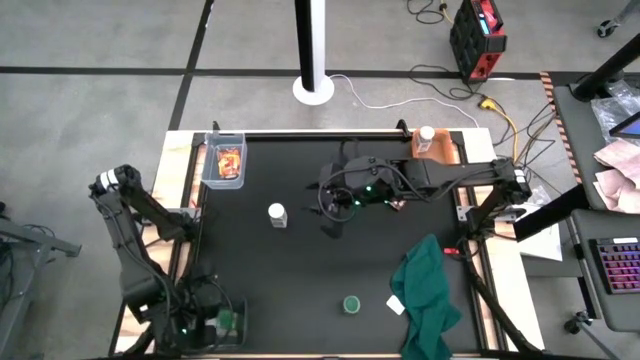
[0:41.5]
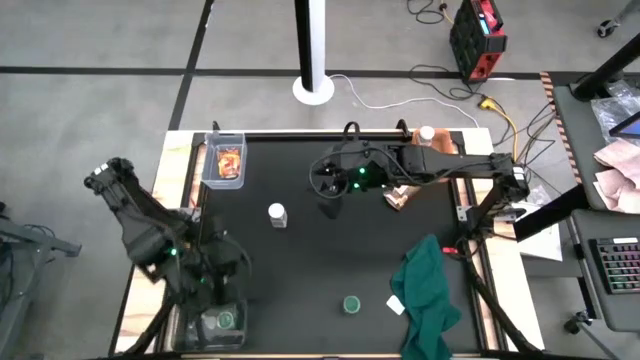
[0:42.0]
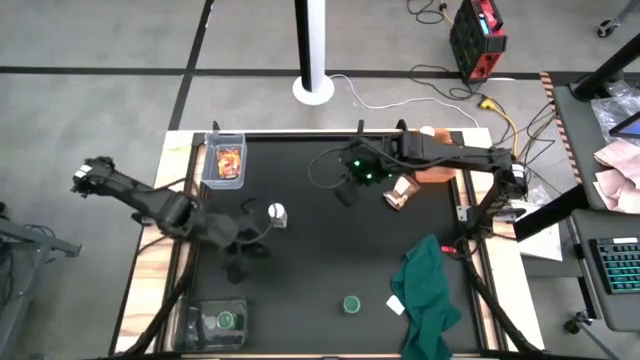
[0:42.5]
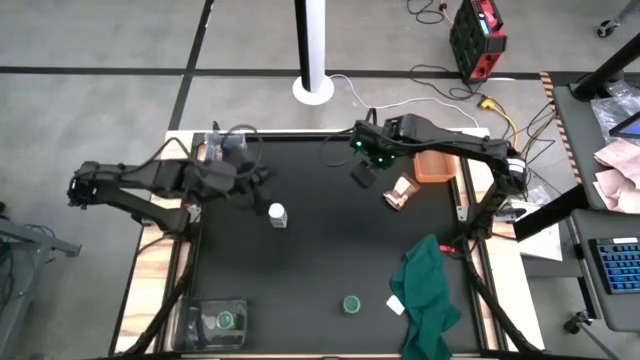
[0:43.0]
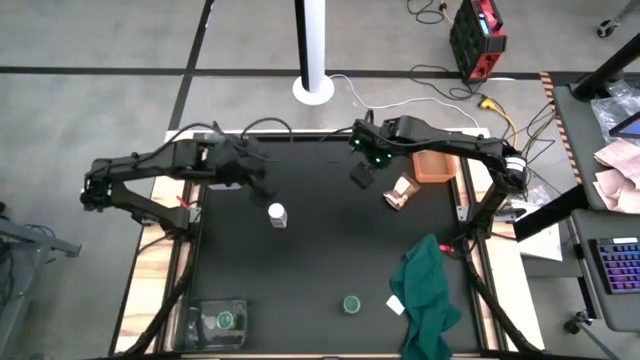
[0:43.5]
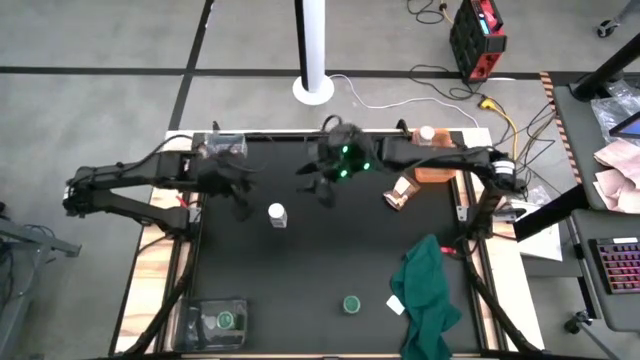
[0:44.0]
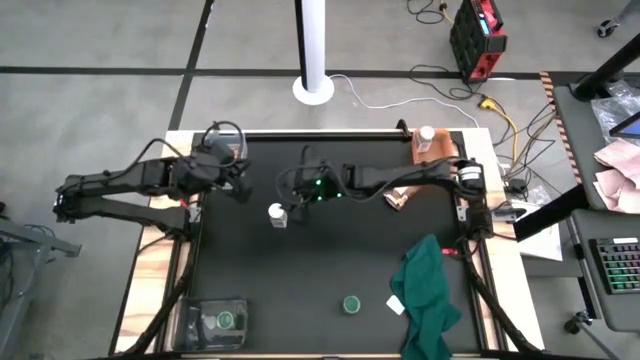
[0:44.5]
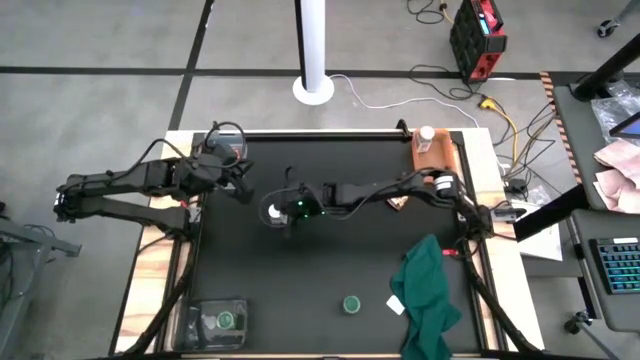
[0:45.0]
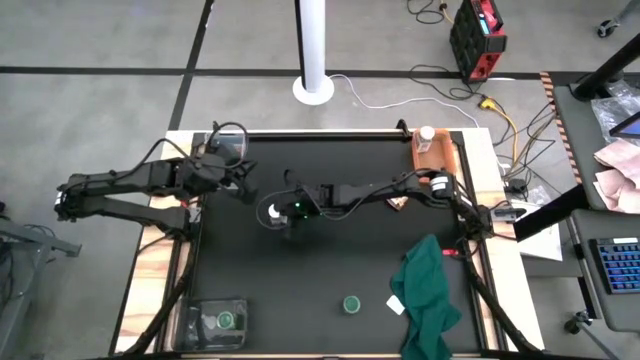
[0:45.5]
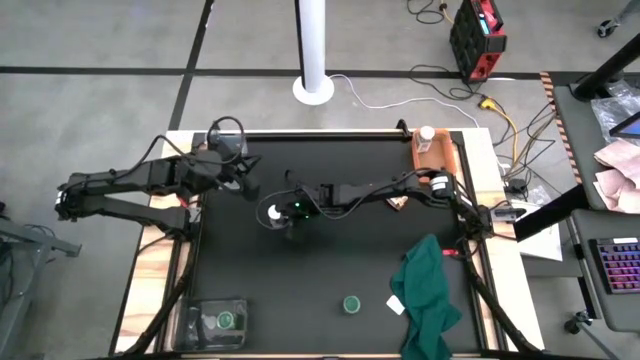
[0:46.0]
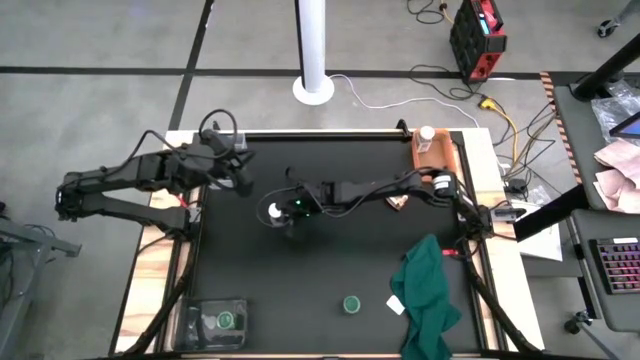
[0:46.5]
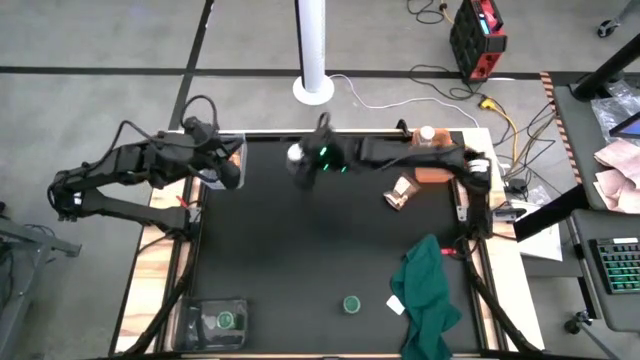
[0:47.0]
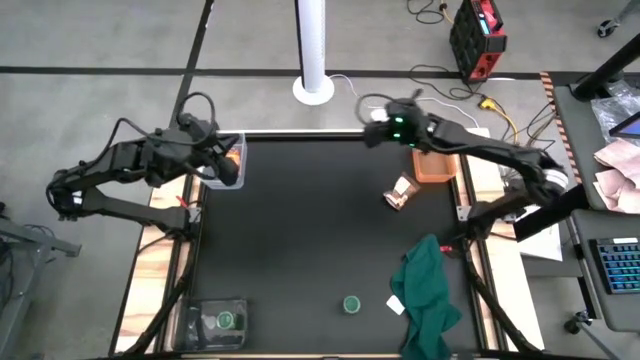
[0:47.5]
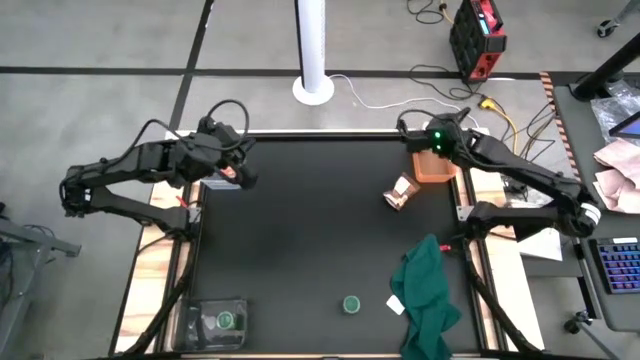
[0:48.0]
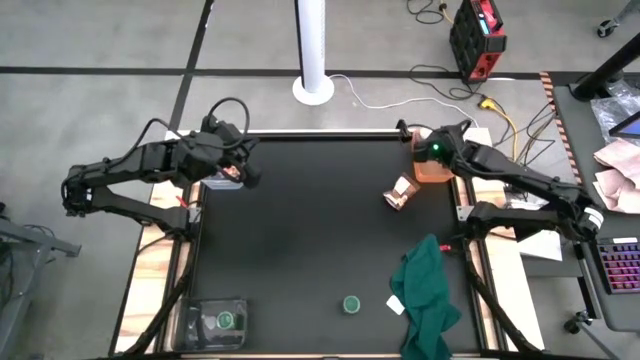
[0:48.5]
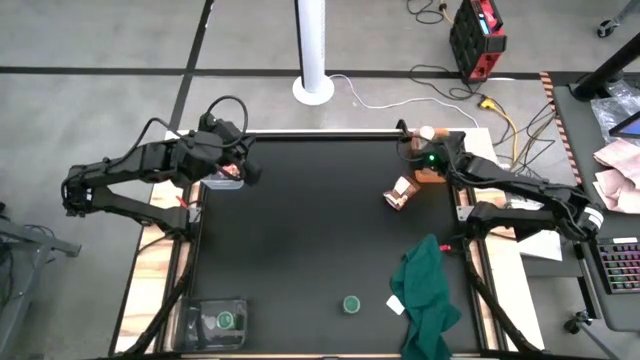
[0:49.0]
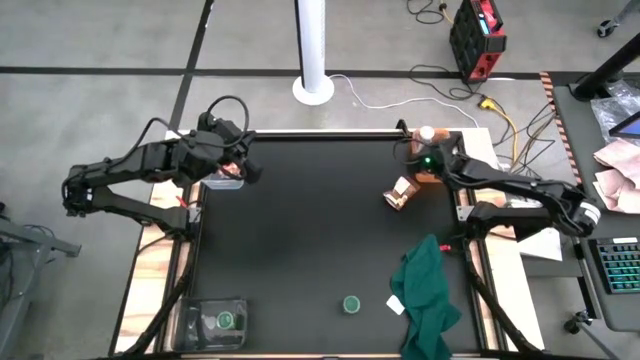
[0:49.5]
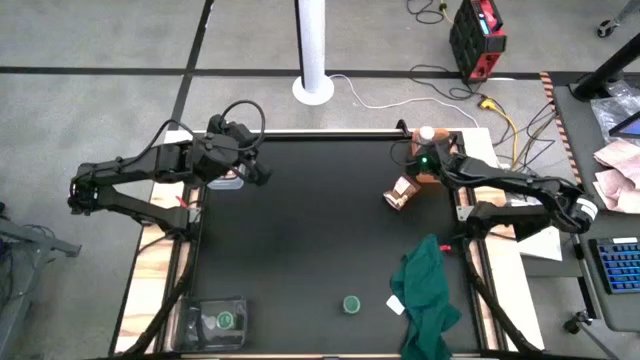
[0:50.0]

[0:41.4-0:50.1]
Task: Sort spices by type
Put the white seasoning bottle into the orange bin

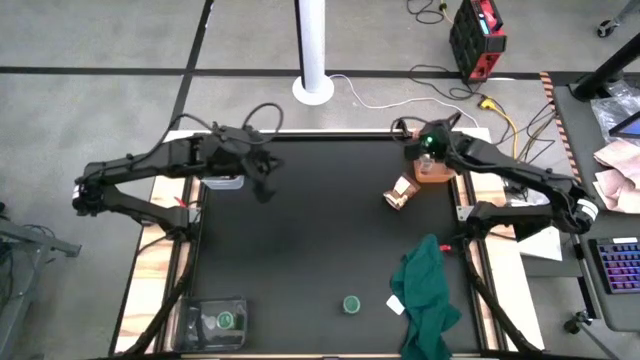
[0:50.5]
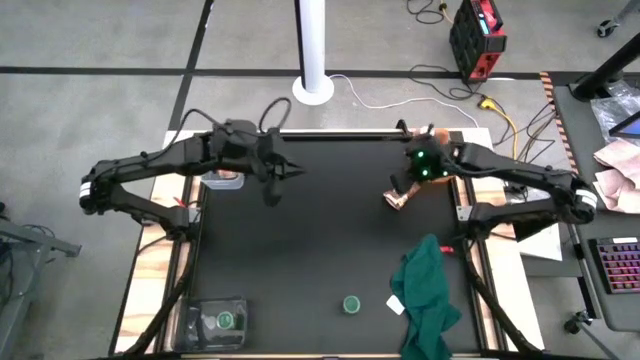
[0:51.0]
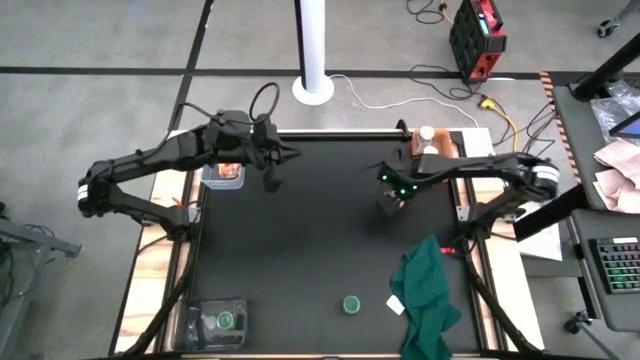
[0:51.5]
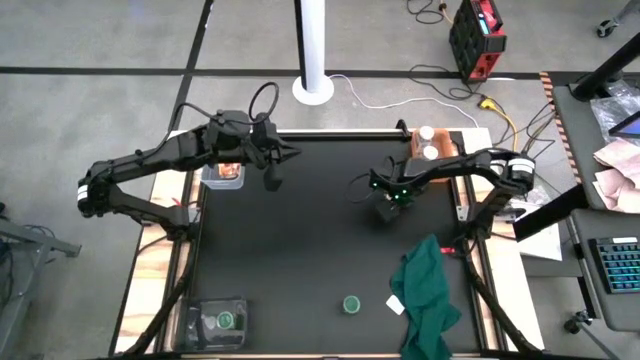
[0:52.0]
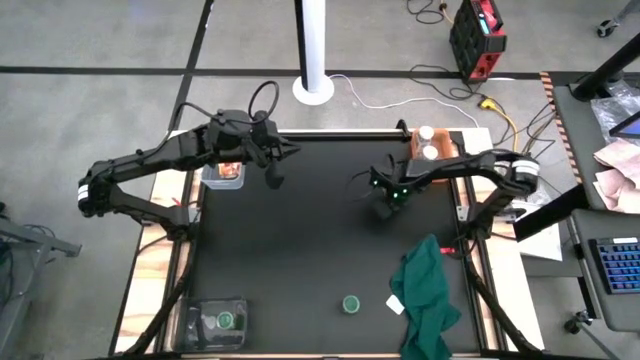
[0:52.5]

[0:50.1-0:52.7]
Put the orange seasoning pack into the transparent bin

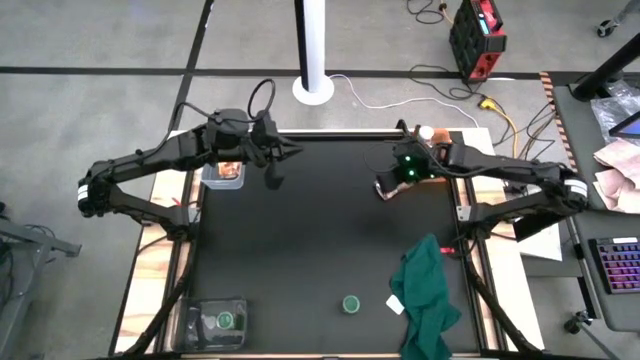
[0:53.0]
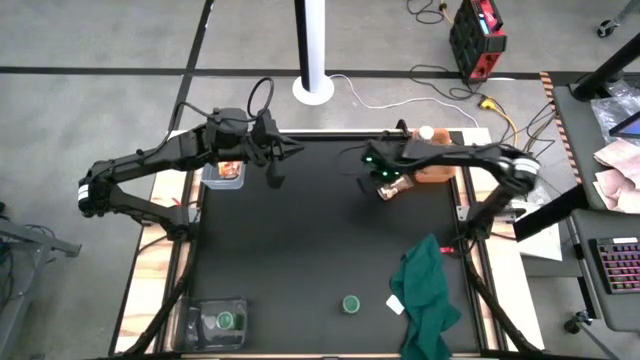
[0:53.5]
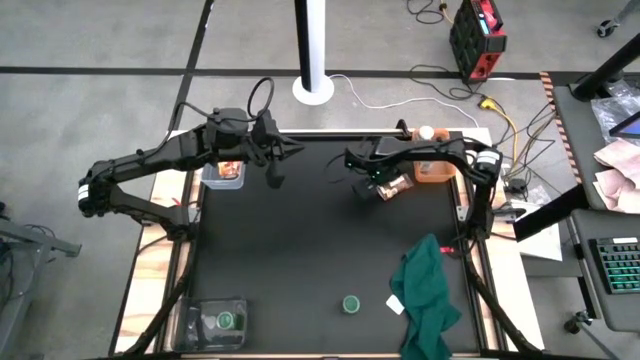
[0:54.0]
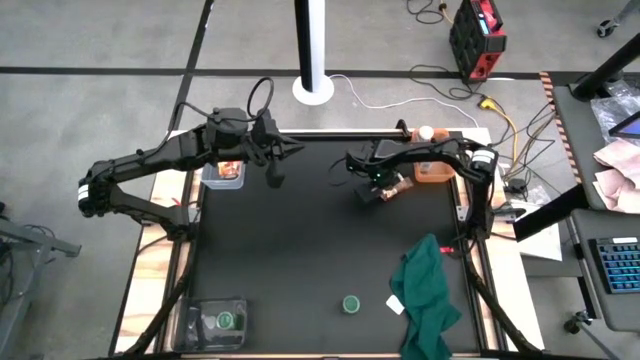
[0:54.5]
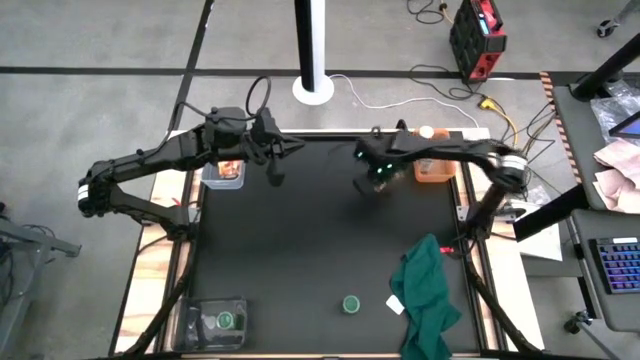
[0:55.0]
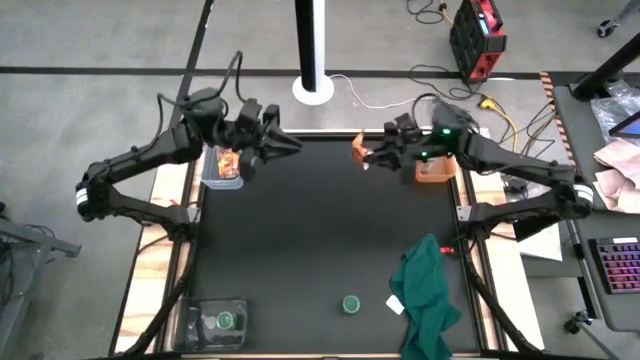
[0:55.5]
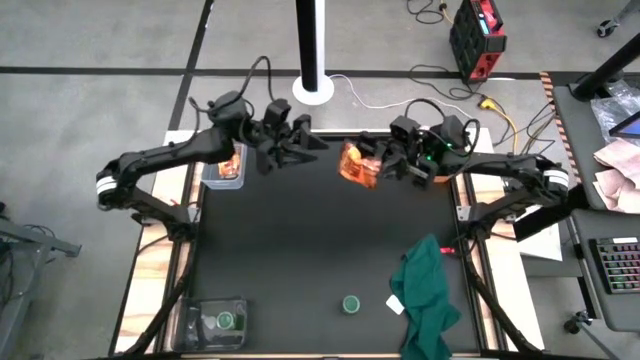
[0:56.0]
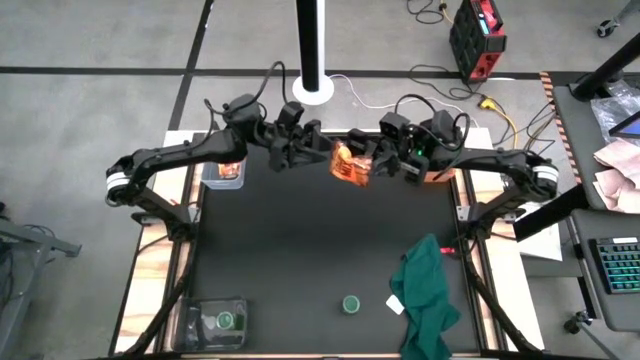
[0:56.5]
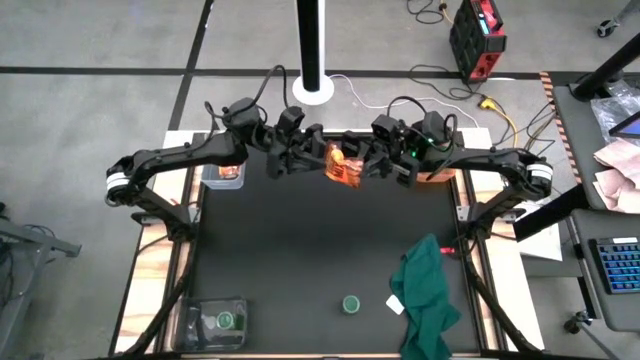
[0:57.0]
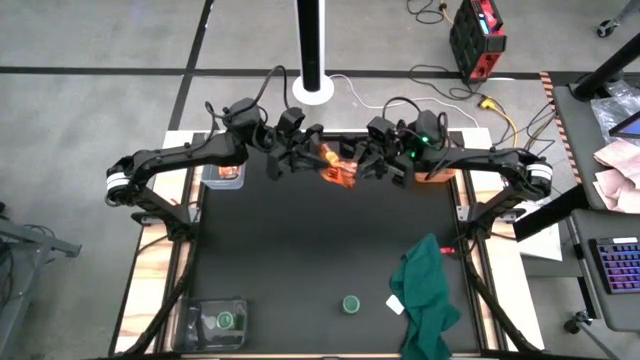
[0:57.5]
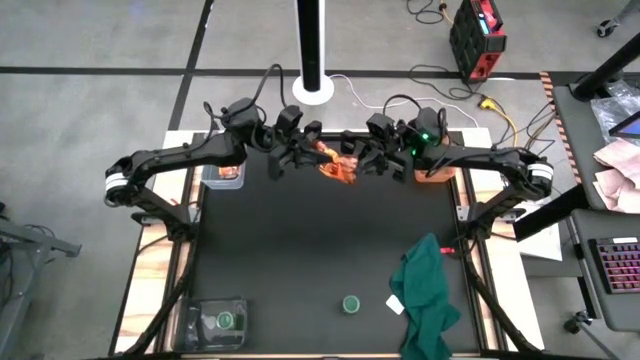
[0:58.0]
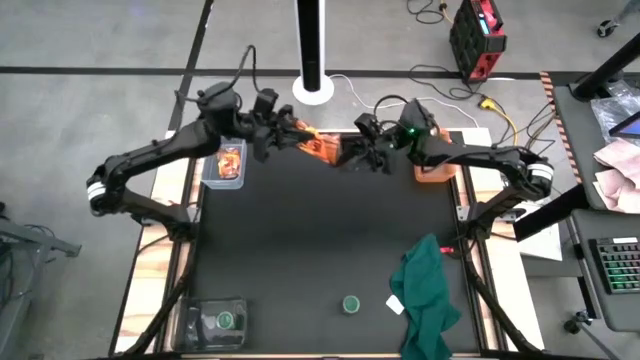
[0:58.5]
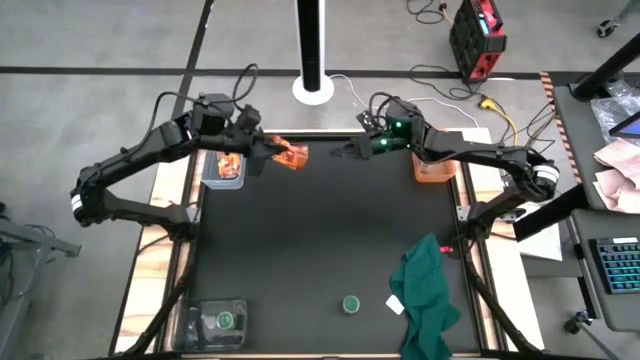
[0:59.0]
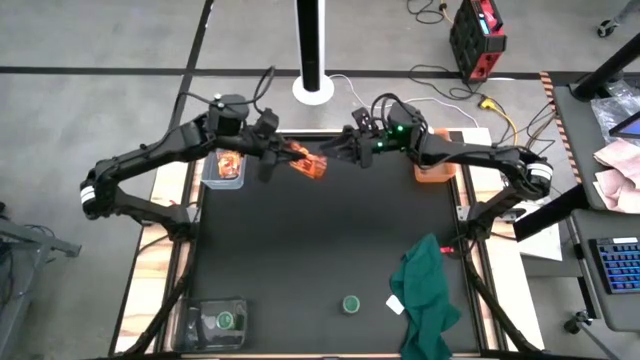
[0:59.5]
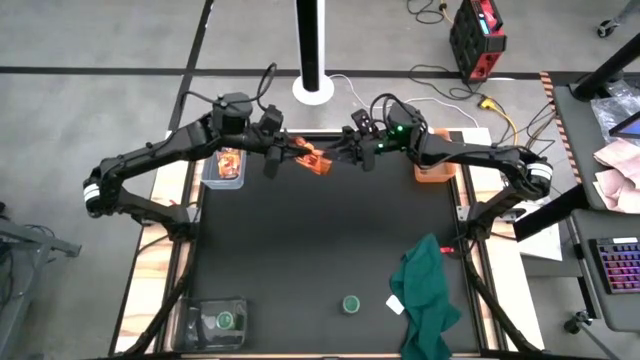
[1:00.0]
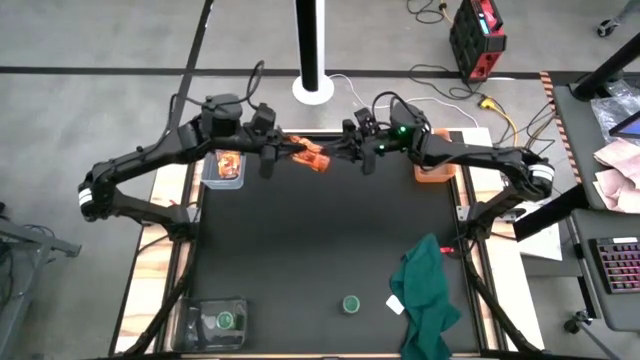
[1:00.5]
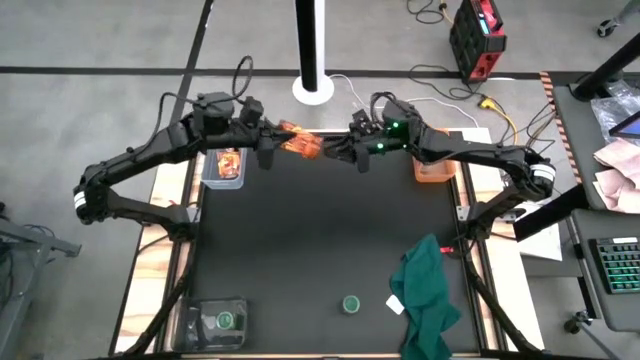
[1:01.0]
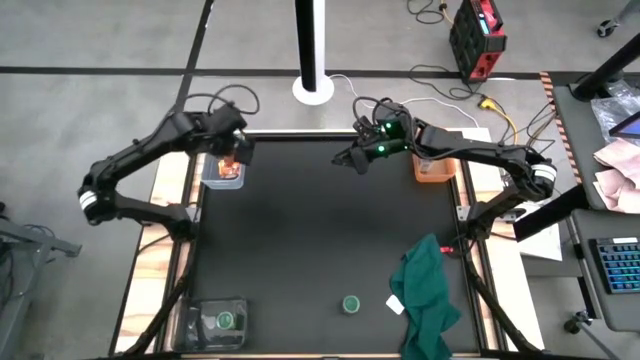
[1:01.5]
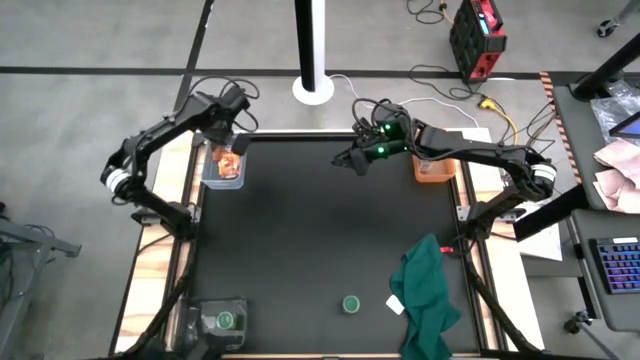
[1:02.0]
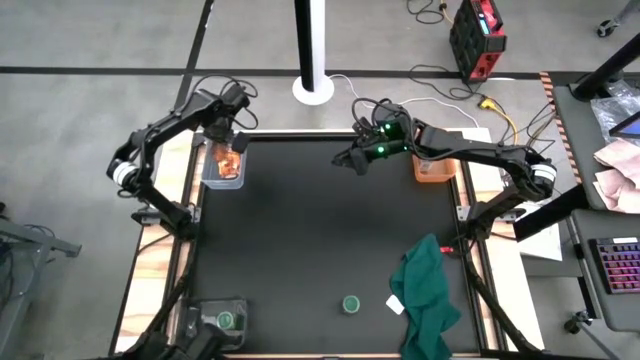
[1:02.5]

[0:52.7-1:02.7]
Put the orange seasoning pack into the transparent bin
